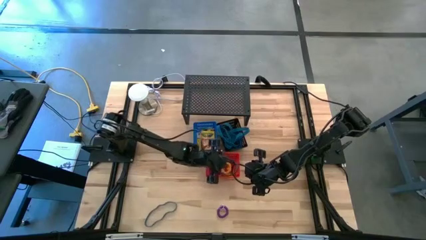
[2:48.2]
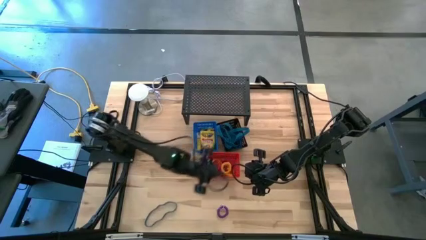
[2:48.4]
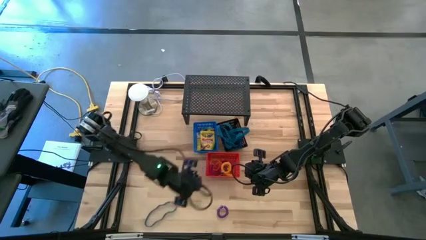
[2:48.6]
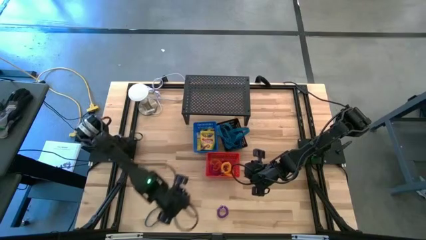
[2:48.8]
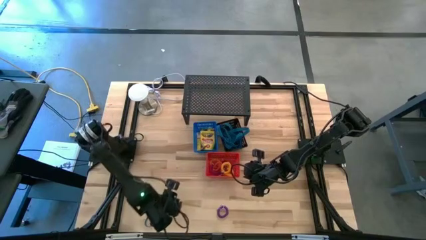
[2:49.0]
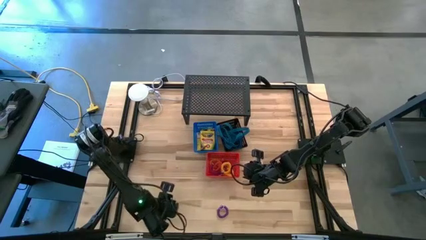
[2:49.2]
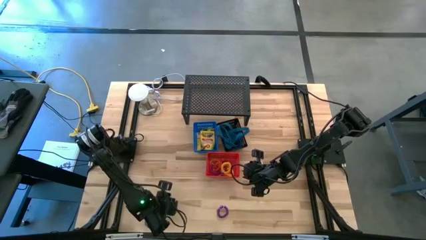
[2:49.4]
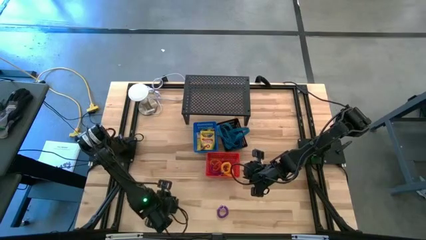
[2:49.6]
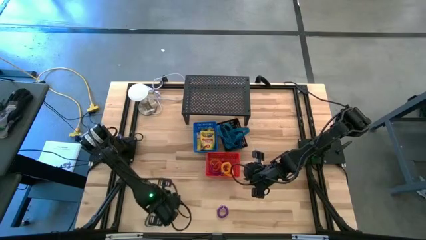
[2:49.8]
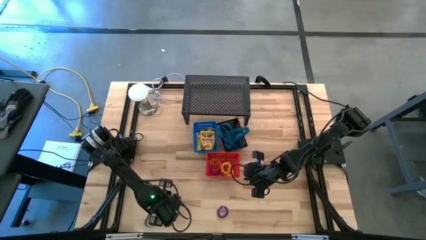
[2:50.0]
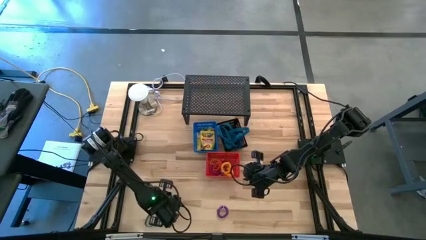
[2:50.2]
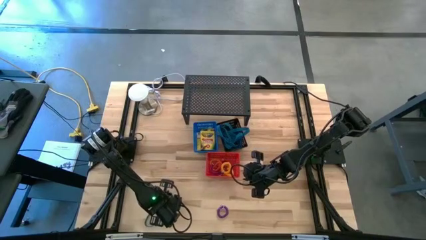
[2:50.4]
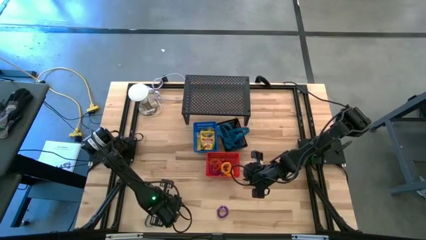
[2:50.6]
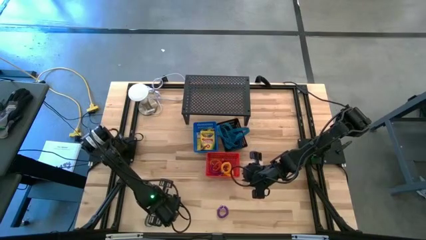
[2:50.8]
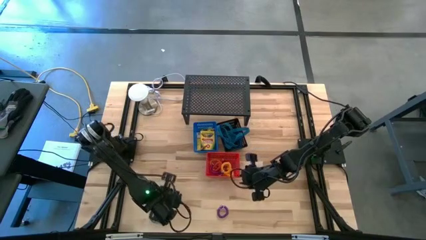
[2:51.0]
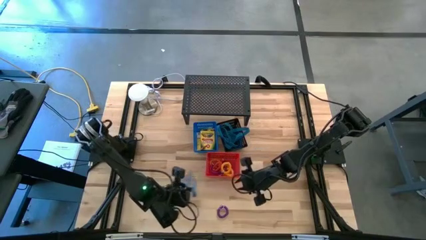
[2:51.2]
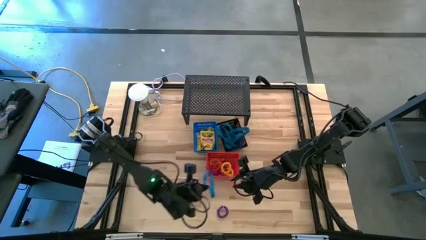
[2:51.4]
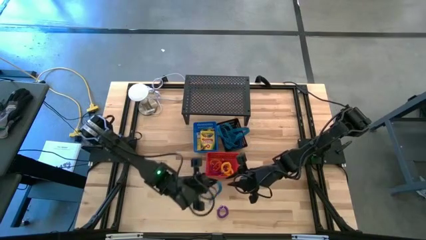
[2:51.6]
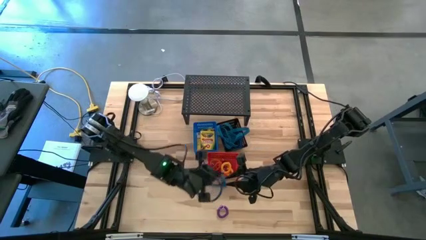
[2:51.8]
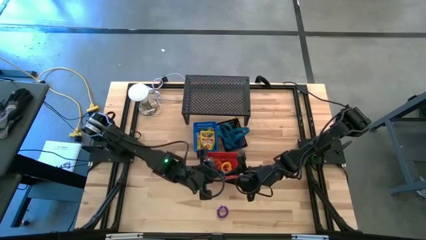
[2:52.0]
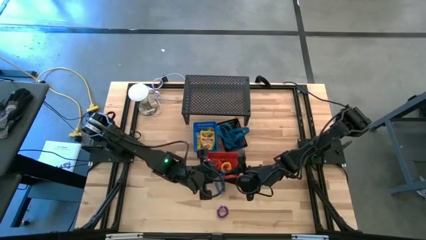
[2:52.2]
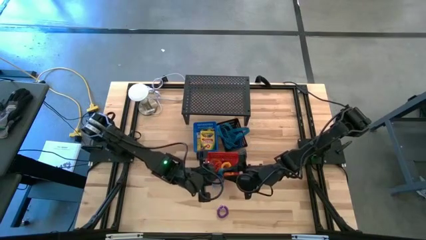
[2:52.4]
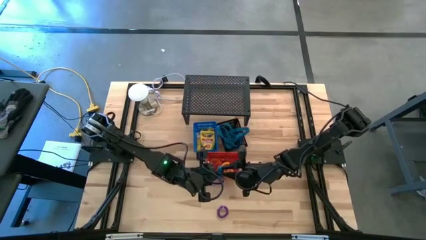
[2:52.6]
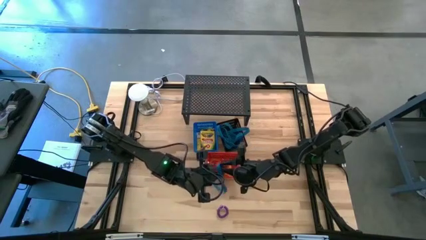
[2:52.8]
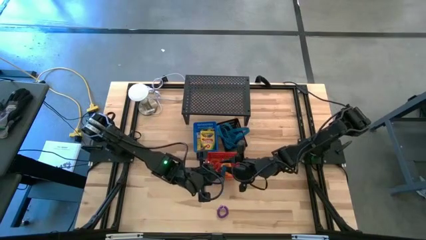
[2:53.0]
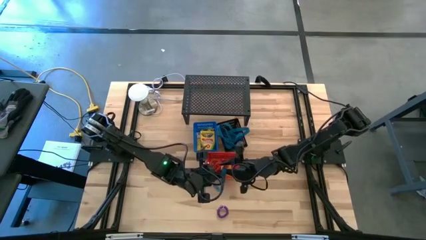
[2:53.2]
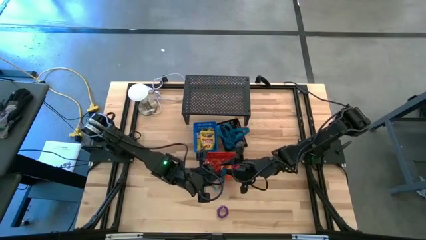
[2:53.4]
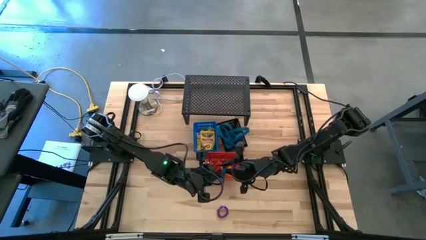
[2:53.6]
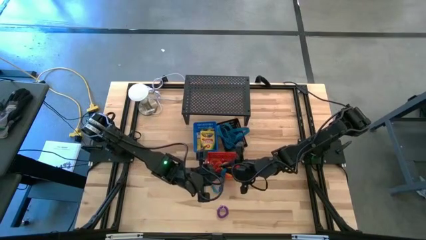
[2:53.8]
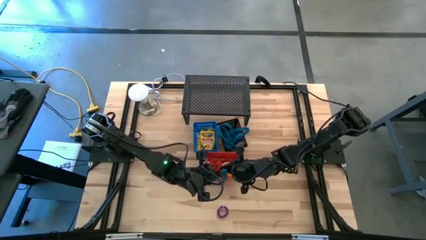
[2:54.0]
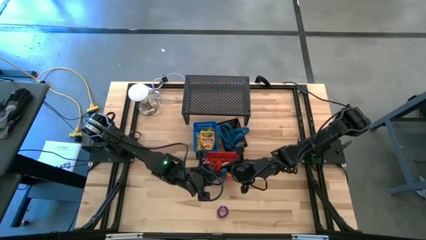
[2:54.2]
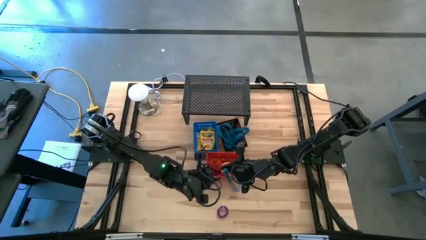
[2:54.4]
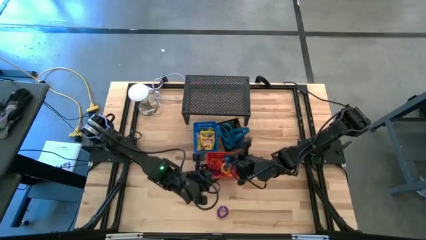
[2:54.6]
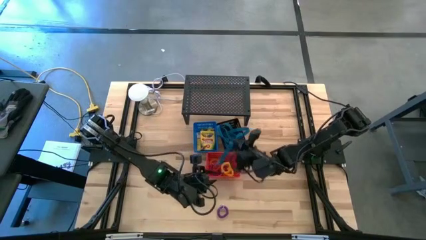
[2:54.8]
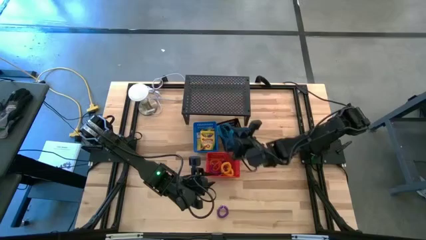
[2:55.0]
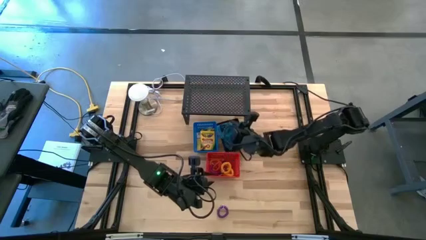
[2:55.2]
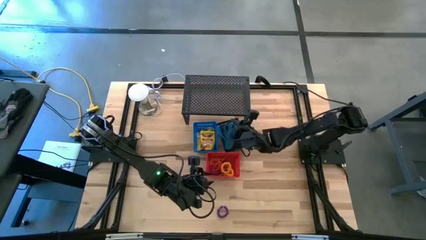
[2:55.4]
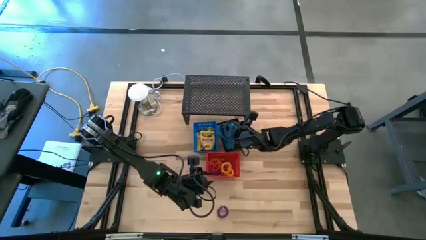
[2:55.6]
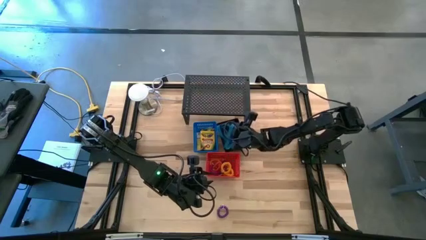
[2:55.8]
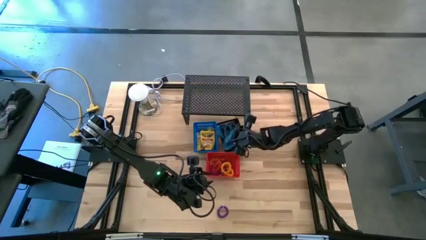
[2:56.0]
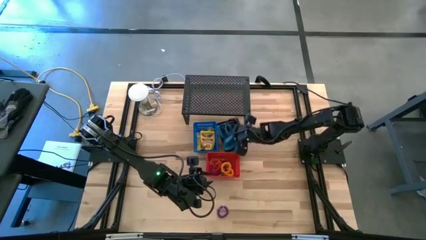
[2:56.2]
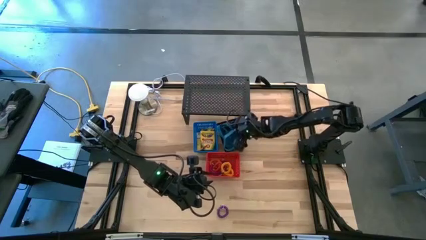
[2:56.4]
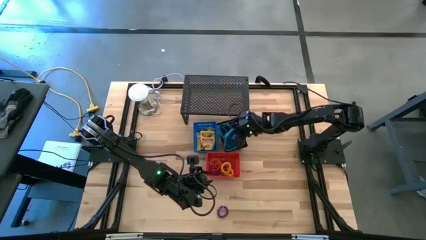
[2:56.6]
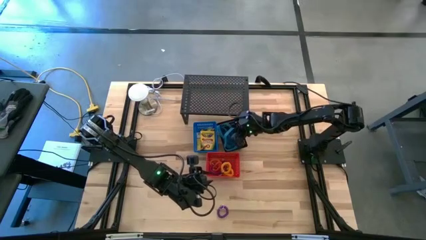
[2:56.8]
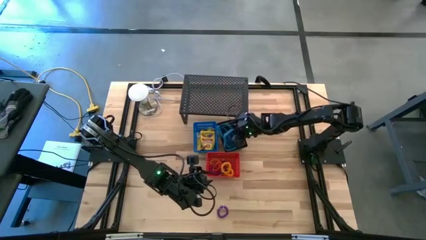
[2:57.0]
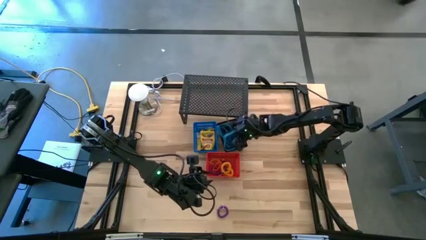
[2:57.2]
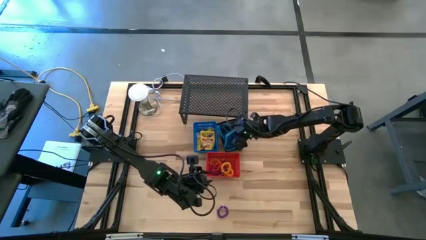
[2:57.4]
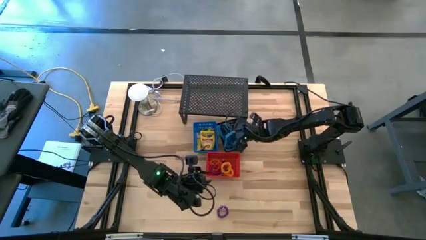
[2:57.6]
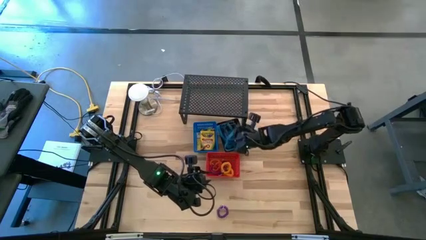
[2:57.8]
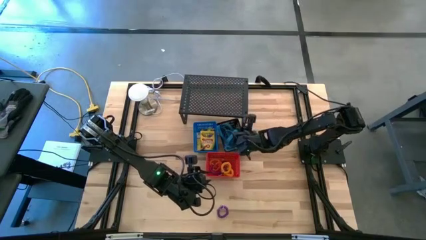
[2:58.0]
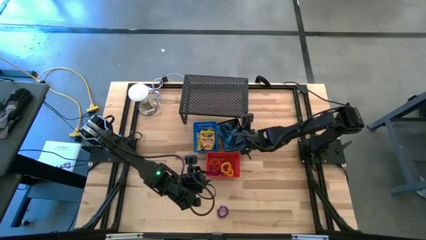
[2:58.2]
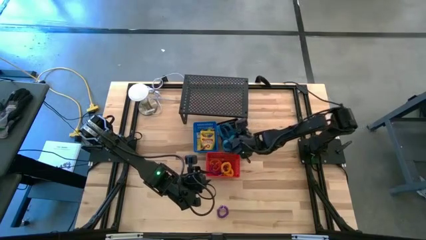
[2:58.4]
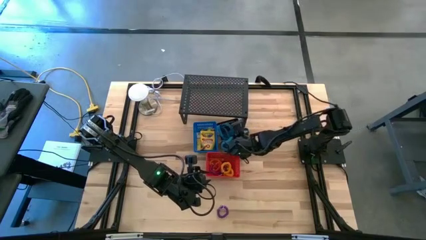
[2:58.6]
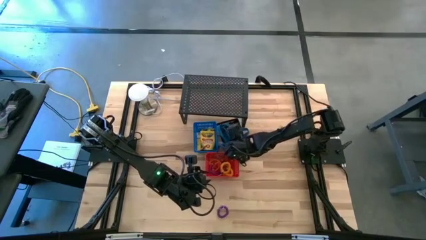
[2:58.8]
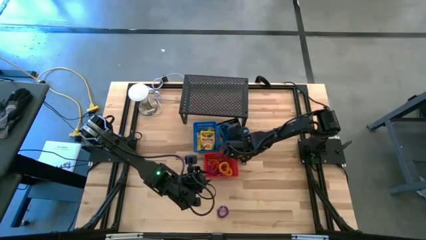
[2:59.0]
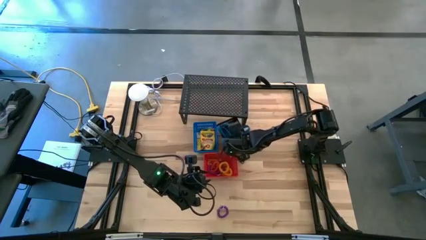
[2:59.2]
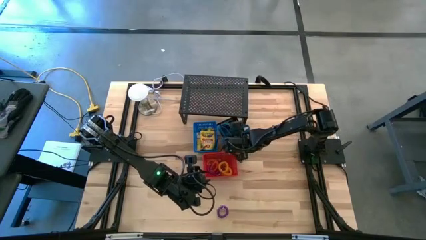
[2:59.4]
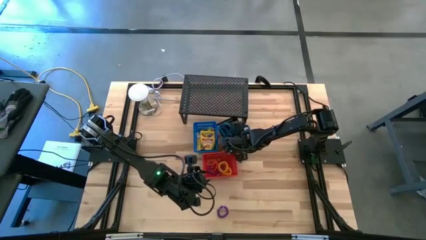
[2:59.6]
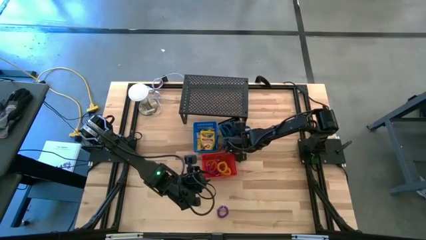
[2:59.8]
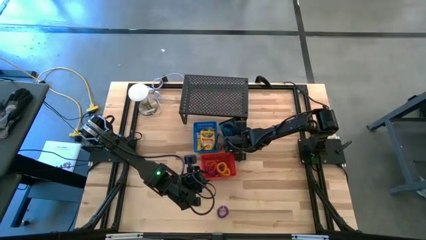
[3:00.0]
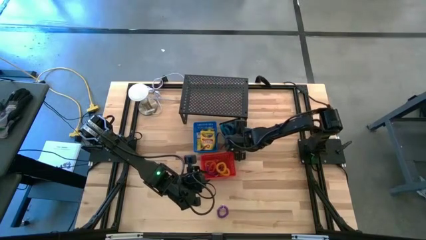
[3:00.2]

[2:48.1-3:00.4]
Task: Pick & Place Office Desk Supplies
Put the blue rubber band into the black bin

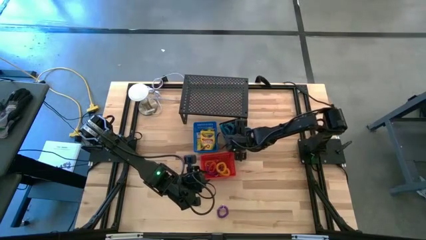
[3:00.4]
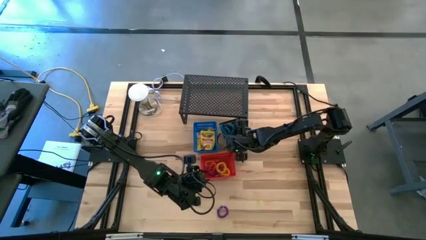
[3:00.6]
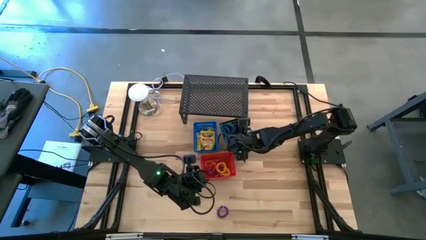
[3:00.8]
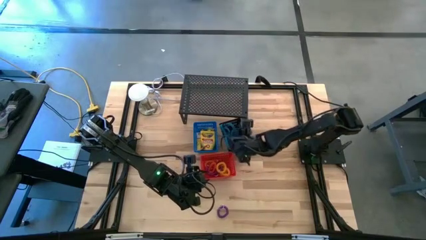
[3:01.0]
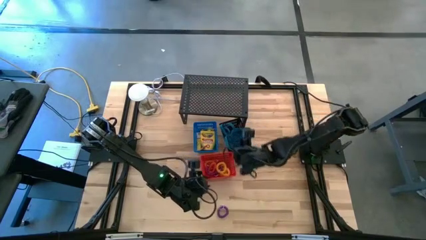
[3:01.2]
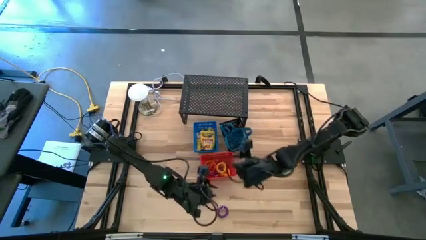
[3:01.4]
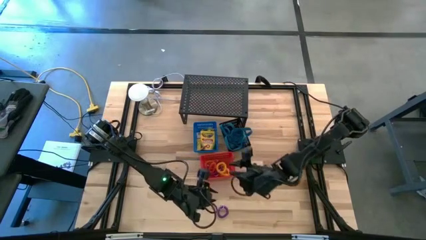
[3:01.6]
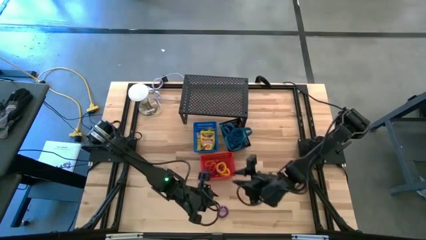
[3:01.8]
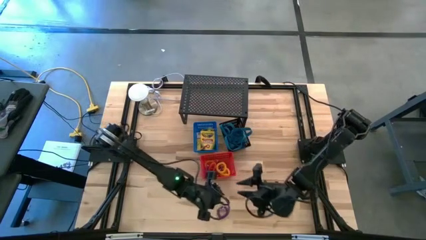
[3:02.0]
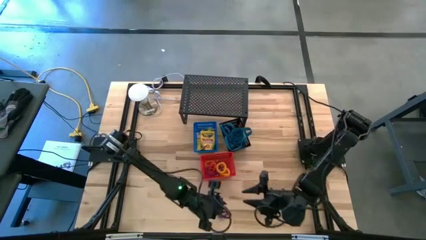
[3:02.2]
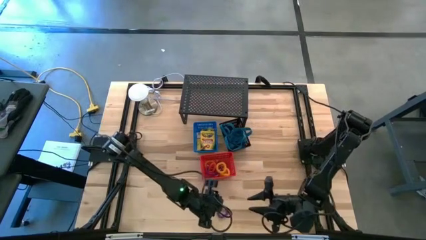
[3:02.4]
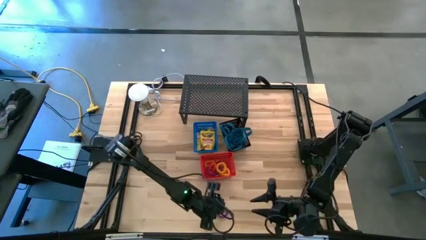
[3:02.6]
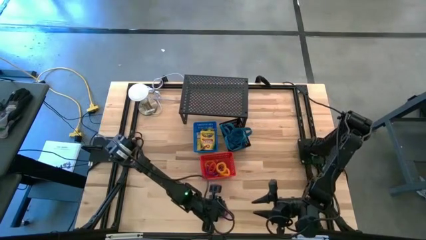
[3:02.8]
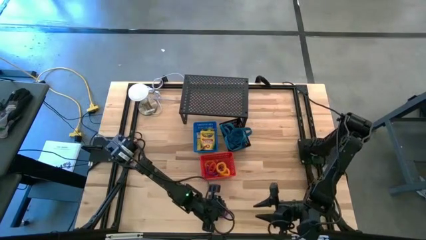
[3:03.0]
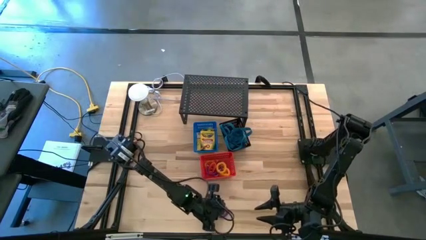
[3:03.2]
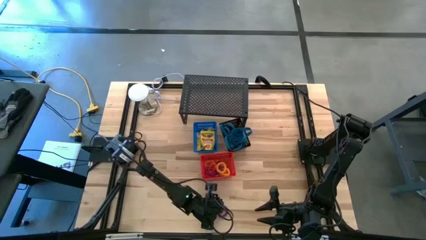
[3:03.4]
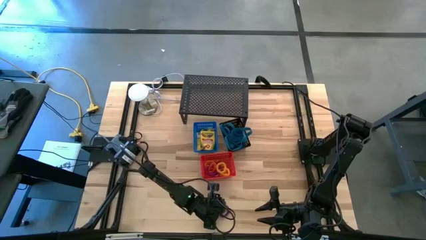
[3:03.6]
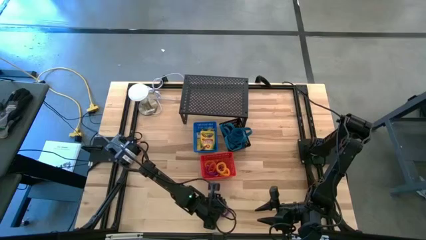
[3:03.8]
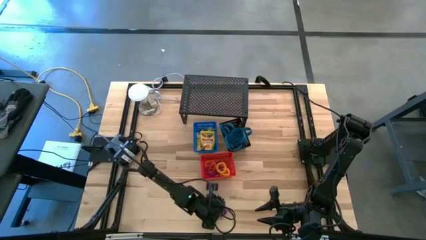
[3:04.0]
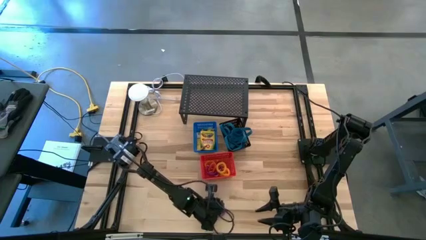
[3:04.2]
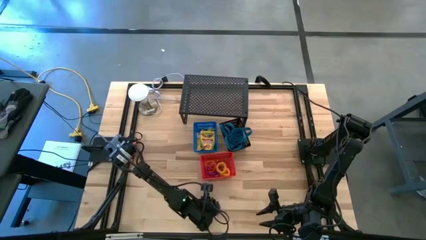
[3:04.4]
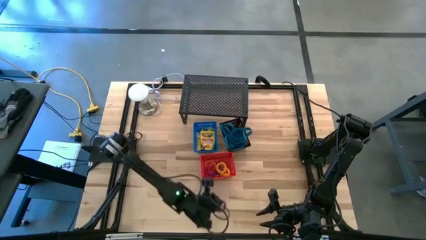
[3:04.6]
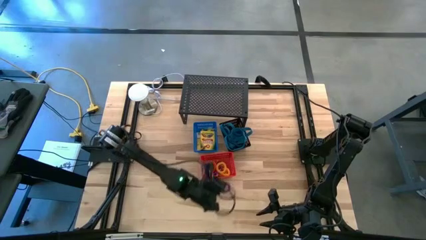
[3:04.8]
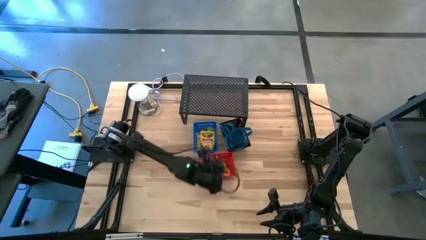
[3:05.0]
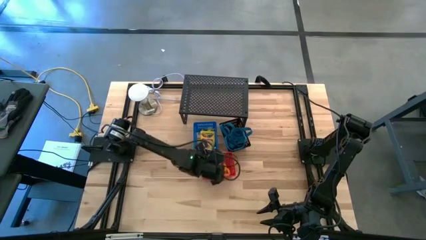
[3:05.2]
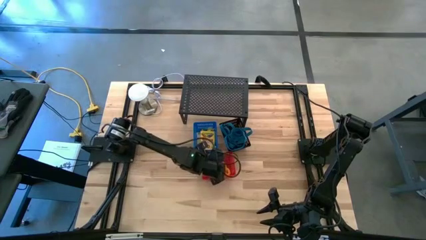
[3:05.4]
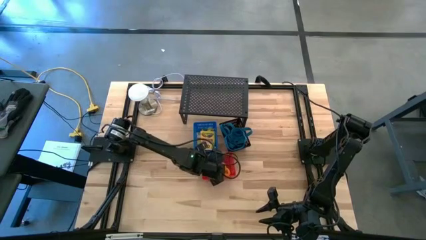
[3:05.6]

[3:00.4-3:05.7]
Put the violet spring keychain into the red bin
